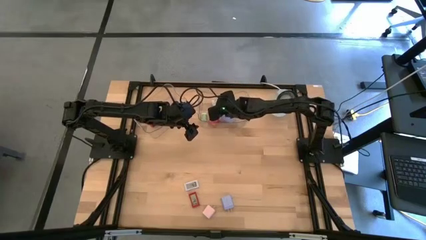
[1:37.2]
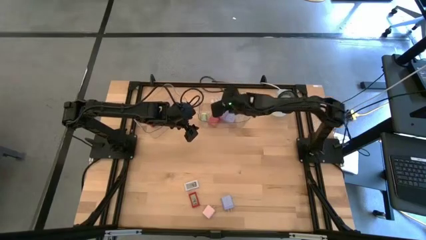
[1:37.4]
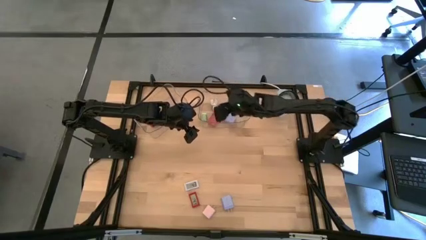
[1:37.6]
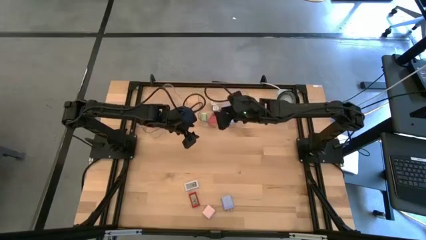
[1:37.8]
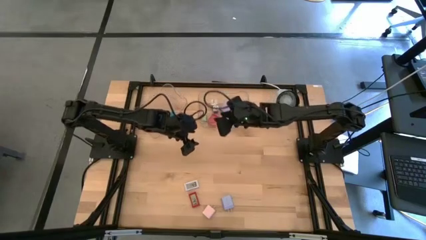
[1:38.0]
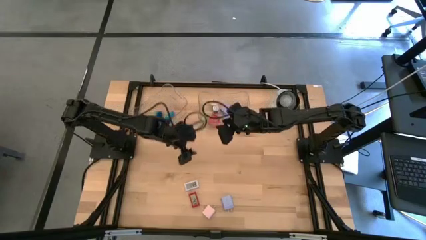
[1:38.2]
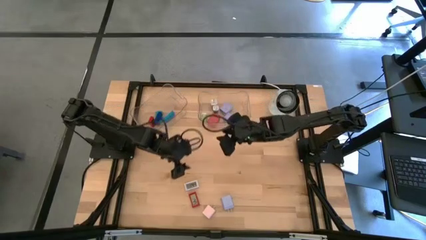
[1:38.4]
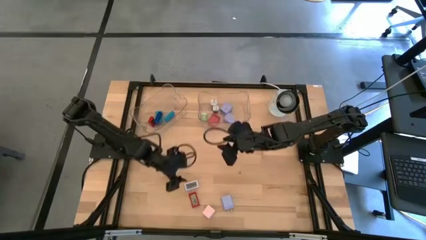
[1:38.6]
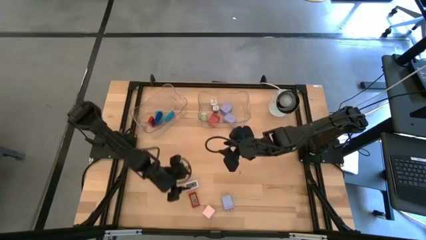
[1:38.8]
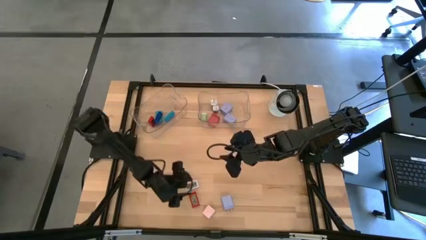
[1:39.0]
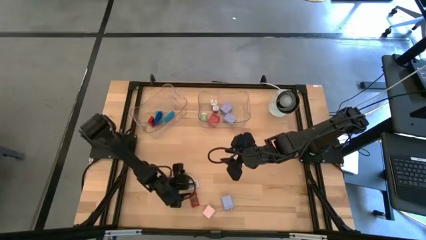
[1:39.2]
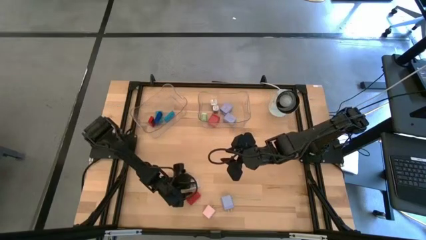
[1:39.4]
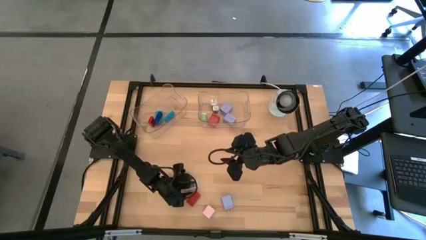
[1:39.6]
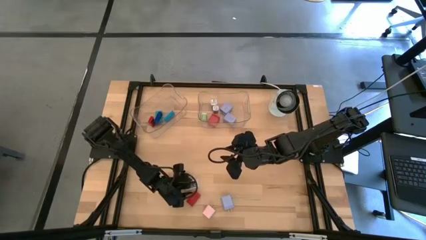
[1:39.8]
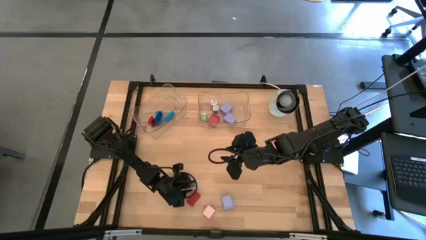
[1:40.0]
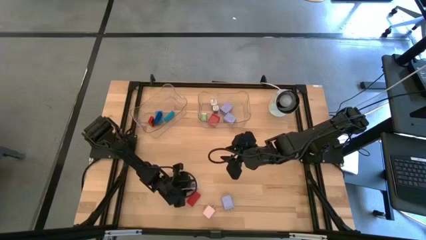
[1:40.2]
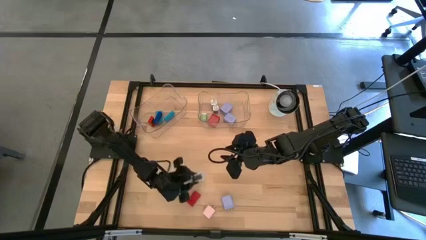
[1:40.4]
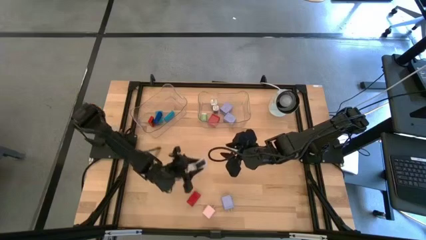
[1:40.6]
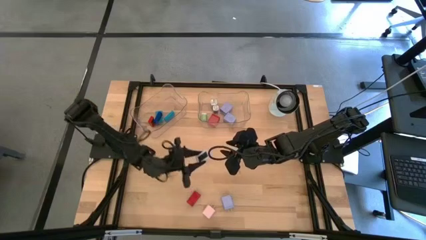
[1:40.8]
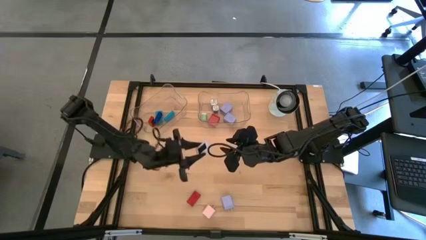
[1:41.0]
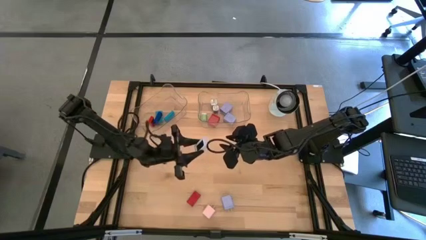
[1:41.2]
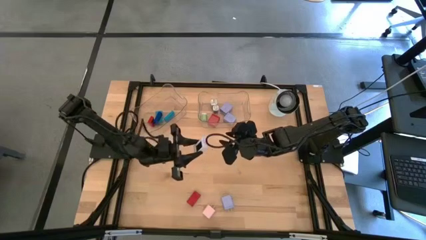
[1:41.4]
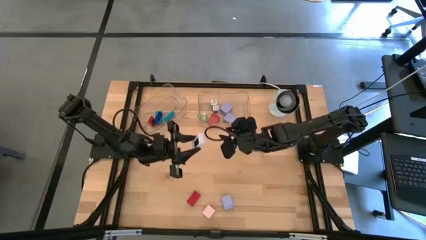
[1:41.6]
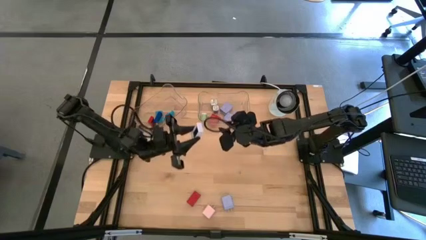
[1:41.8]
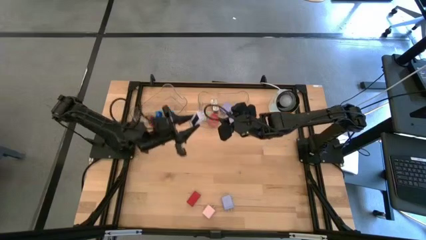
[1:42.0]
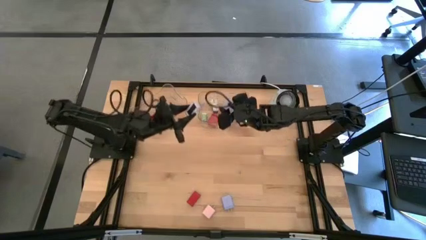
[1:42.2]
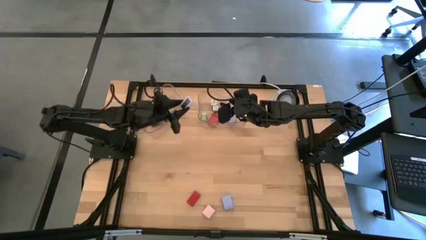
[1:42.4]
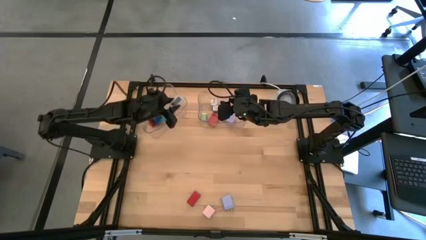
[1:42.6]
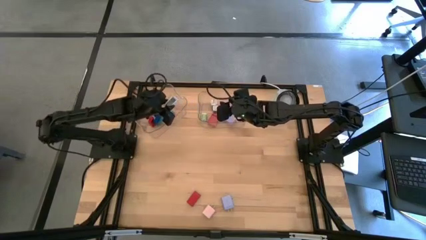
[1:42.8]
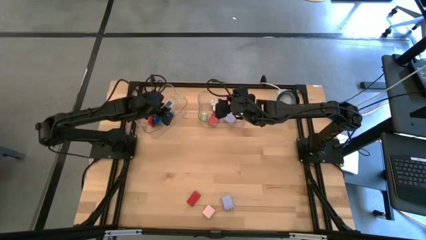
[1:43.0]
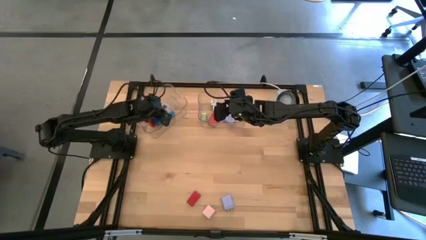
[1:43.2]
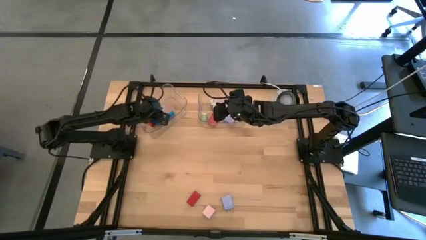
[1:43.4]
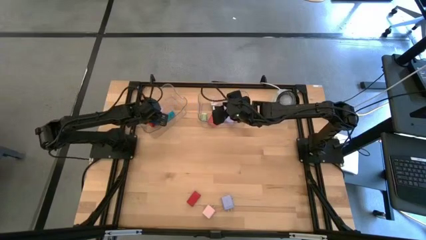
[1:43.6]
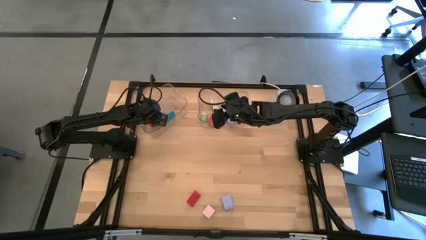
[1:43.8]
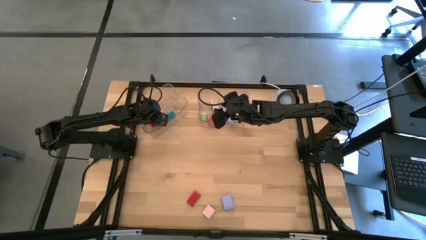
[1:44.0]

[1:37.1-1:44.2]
Task: Pick & Place Office items
Put the white digital timer into the left transparent bin

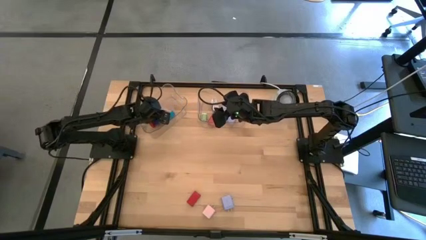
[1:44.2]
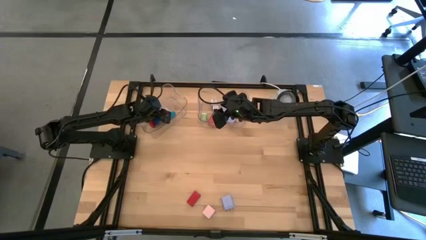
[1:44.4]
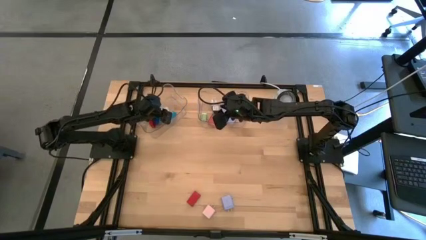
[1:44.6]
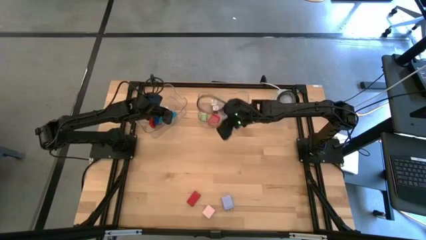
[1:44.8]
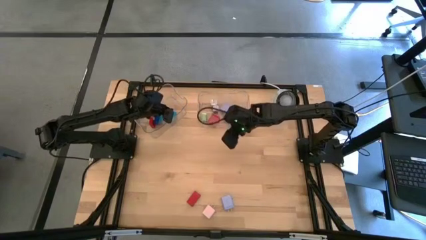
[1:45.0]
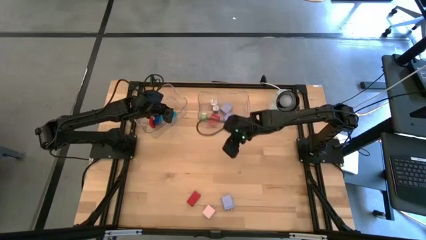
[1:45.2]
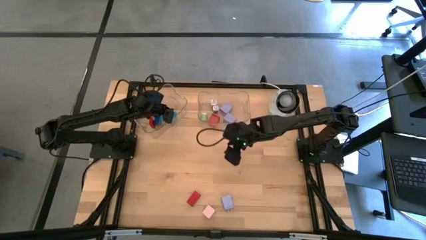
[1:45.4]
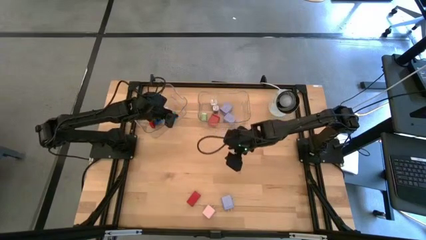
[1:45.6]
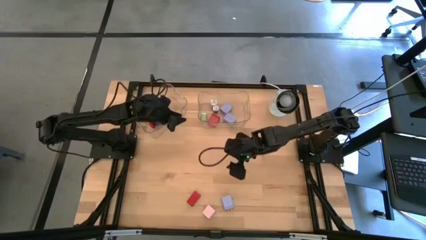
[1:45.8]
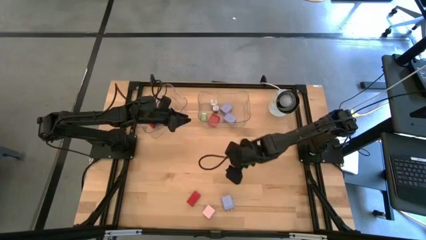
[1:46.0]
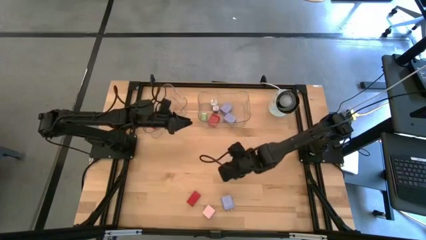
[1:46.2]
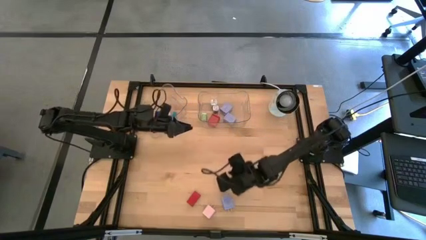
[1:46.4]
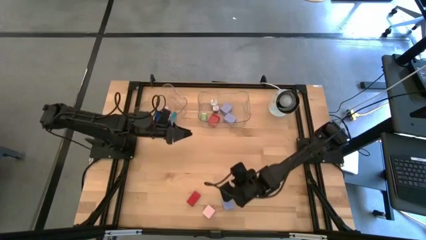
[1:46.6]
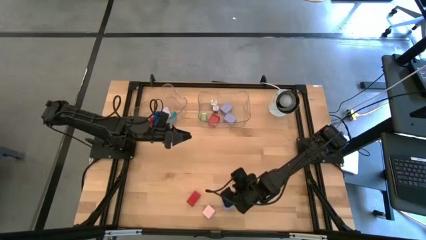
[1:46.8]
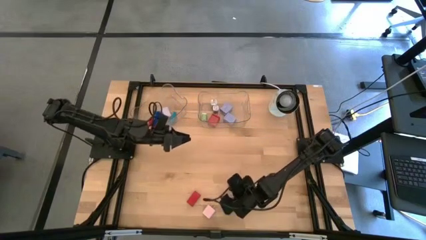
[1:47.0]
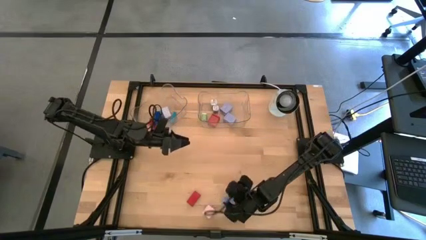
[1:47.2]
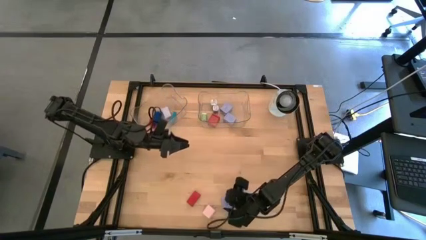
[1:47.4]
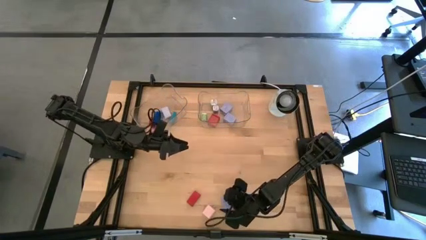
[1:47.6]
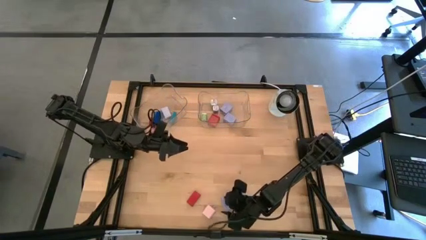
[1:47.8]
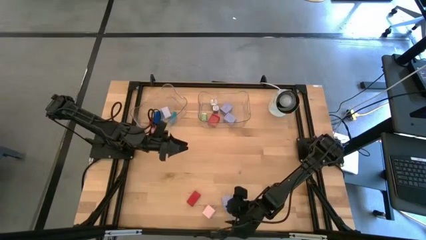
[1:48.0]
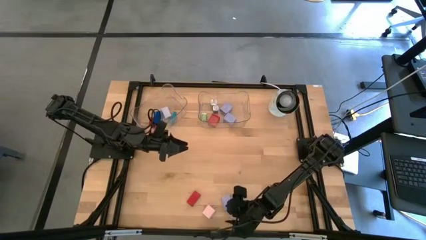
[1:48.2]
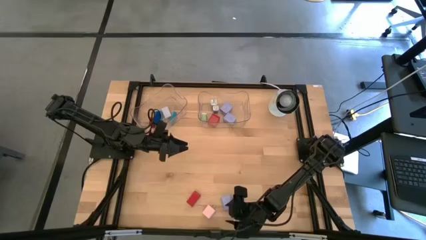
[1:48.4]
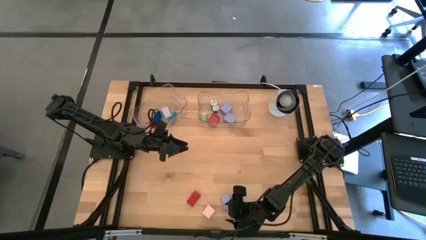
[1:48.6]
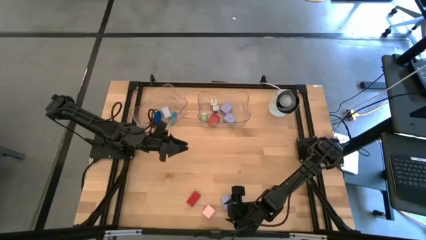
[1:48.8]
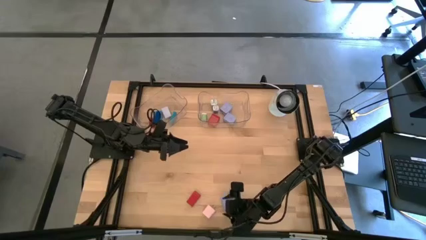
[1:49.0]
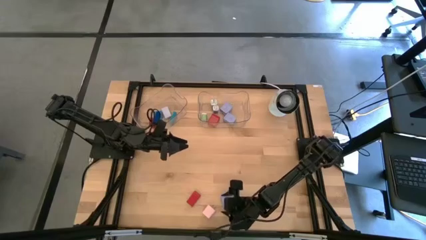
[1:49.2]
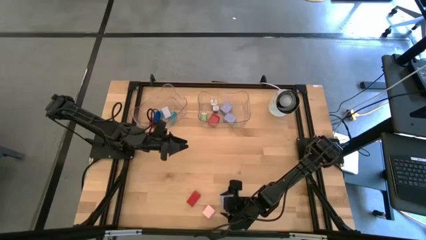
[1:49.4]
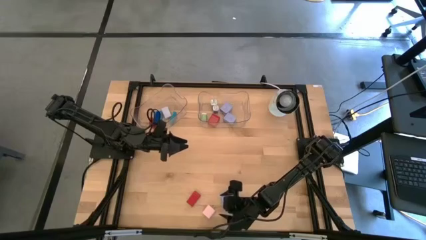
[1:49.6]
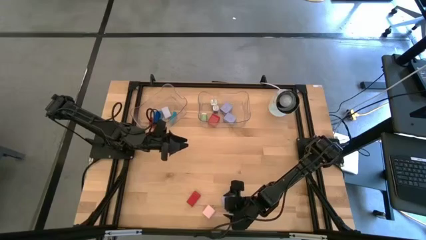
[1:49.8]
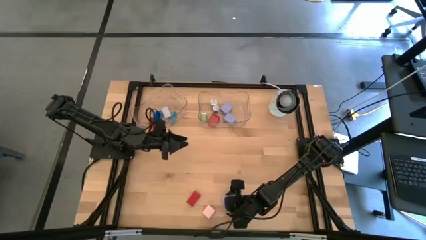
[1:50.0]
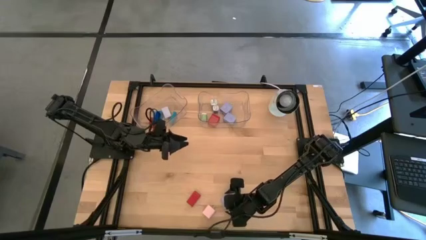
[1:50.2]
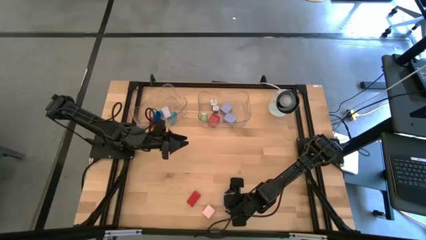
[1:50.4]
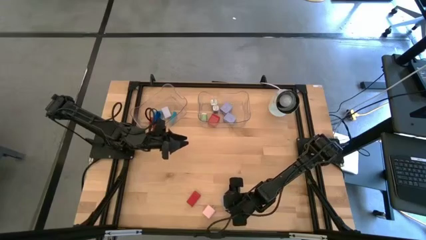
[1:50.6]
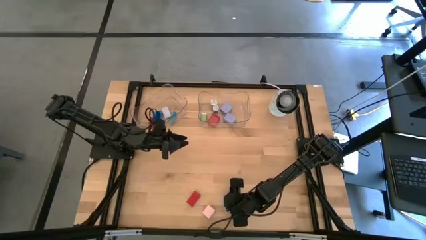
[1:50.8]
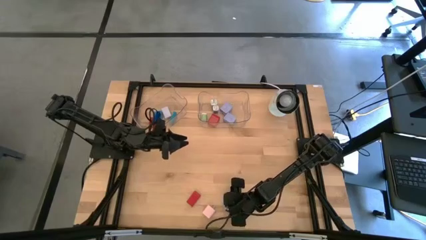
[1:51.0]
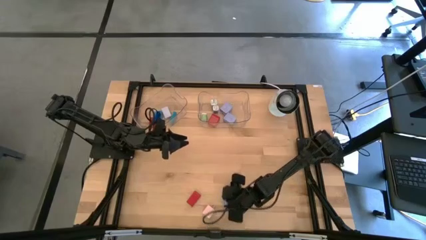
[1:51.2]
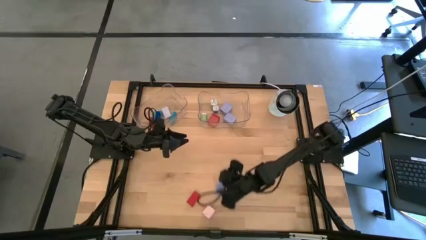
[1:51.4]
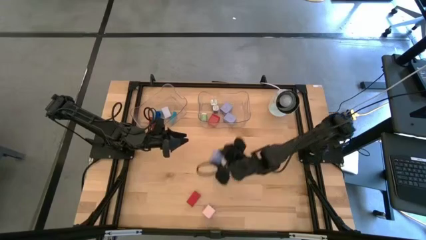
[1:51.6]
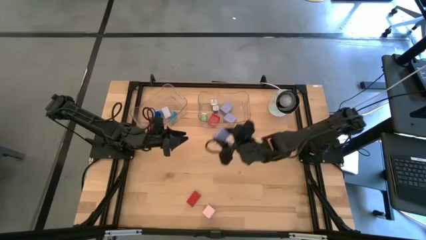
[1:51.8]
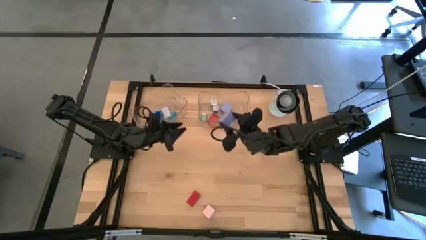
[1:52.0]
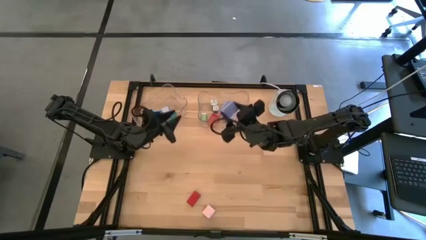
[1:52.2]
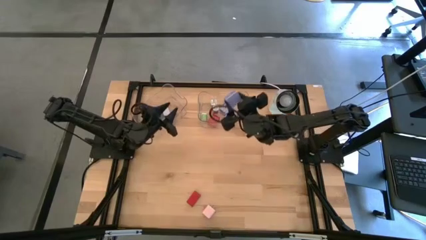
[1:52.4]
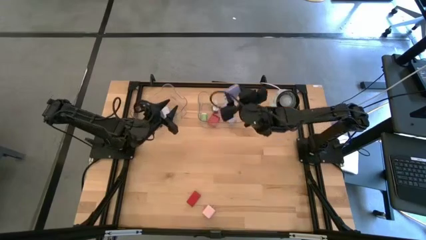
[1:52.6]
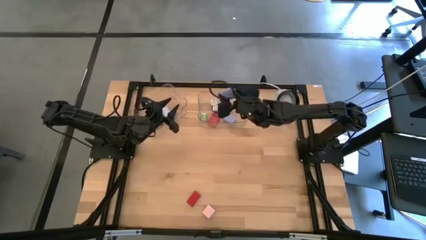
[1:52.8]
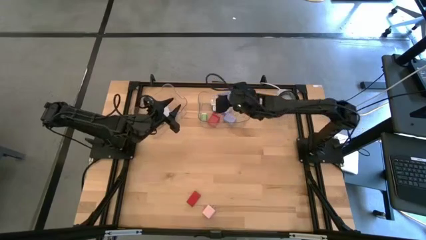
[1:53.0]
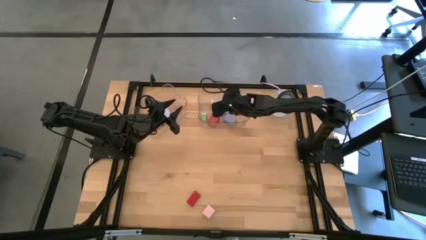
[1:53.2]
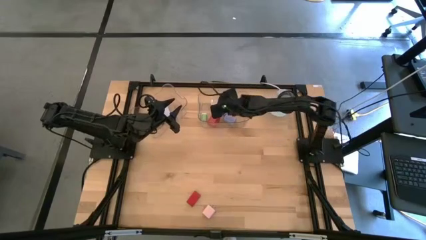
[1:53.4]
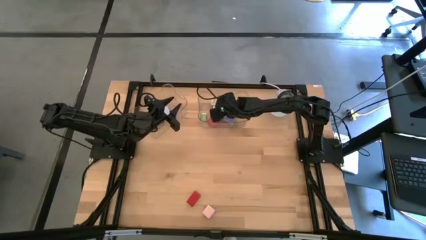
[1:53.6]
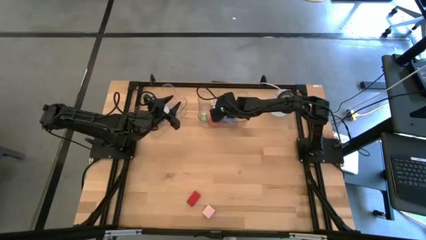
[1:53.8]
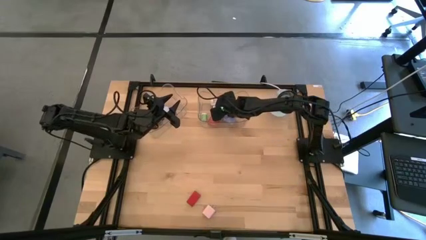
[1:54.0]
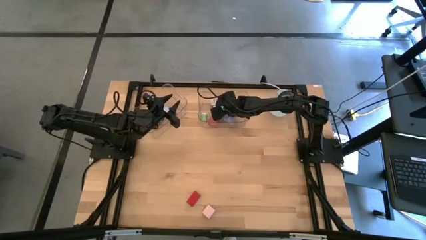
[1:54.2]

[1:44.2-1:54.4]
Put the blue charger adapter into the right transparent bin
